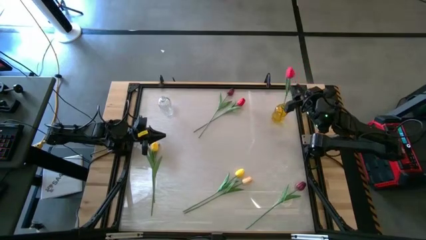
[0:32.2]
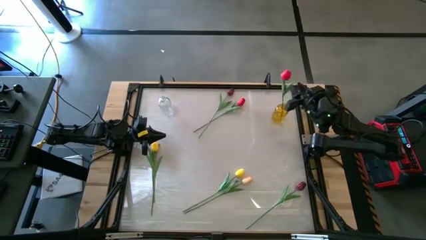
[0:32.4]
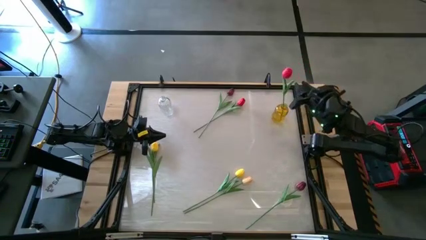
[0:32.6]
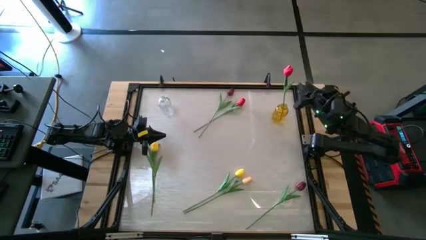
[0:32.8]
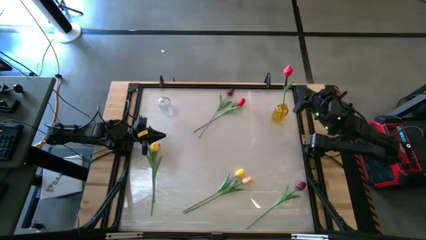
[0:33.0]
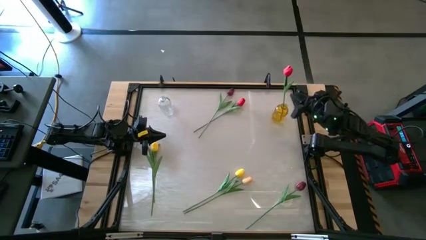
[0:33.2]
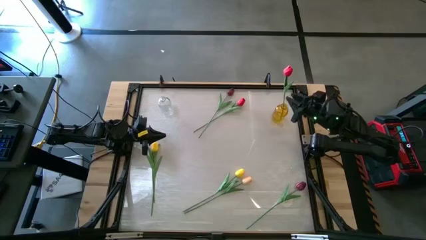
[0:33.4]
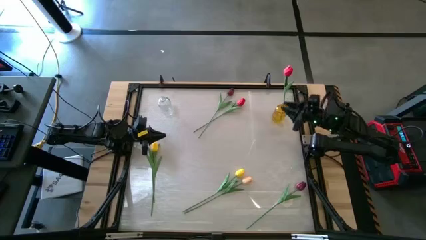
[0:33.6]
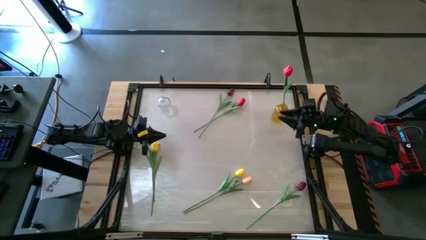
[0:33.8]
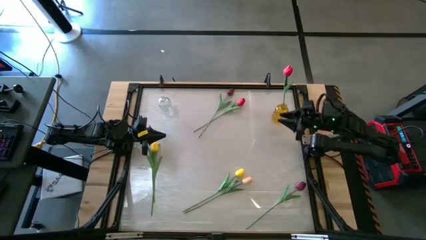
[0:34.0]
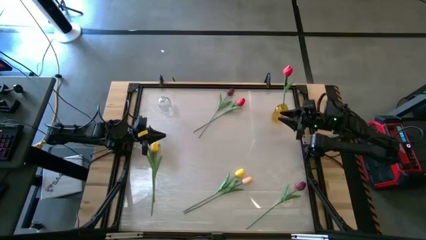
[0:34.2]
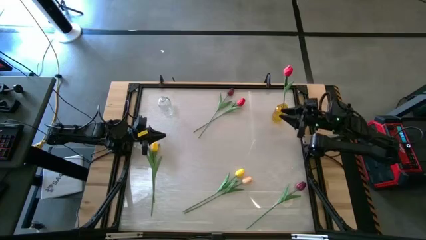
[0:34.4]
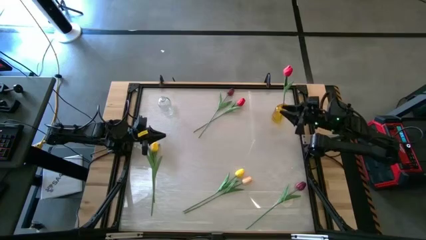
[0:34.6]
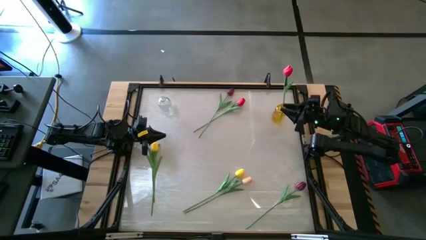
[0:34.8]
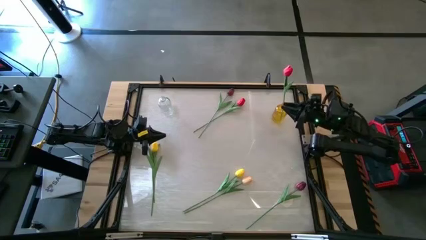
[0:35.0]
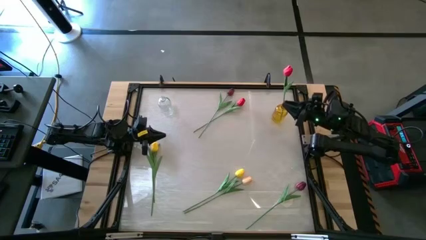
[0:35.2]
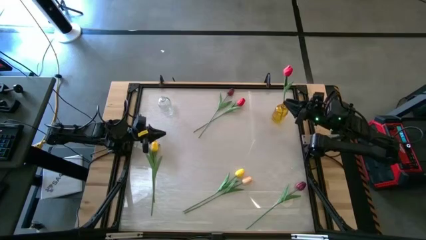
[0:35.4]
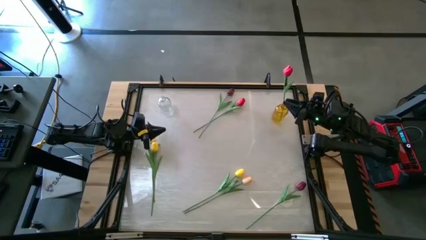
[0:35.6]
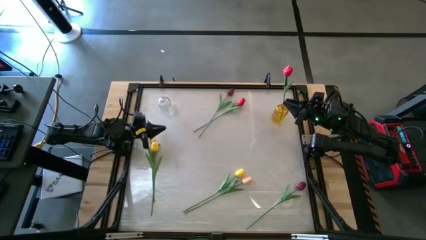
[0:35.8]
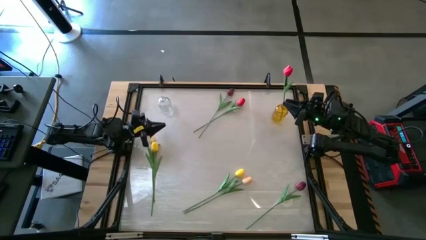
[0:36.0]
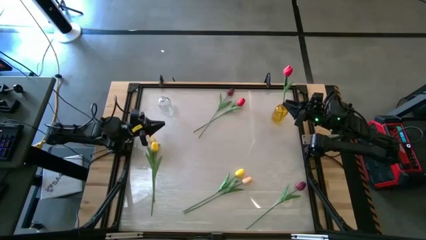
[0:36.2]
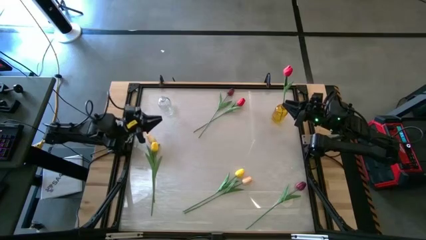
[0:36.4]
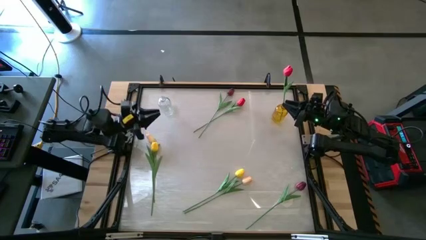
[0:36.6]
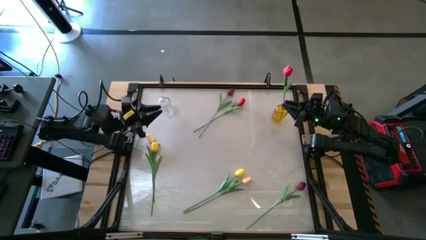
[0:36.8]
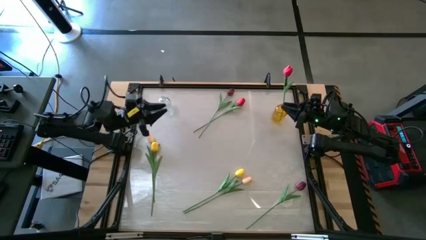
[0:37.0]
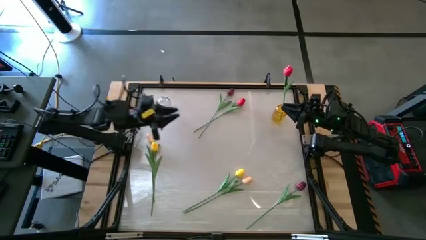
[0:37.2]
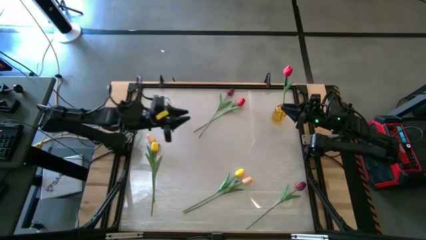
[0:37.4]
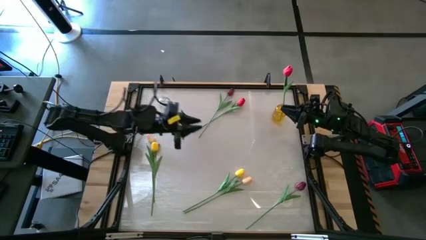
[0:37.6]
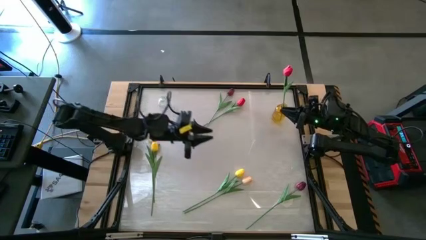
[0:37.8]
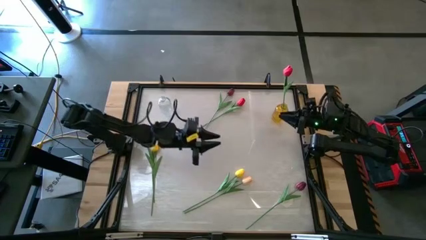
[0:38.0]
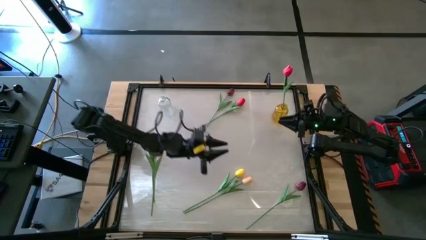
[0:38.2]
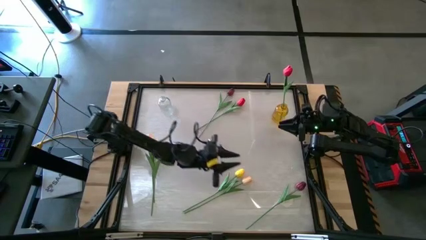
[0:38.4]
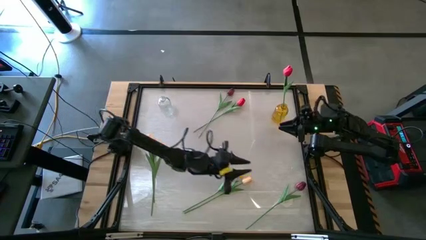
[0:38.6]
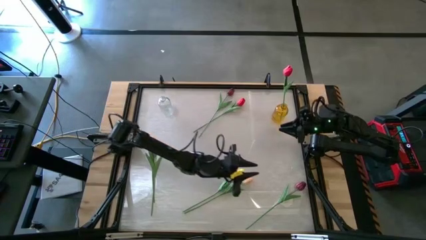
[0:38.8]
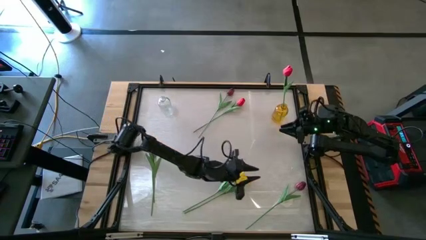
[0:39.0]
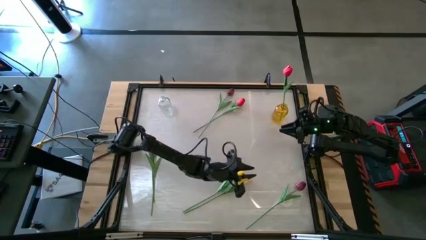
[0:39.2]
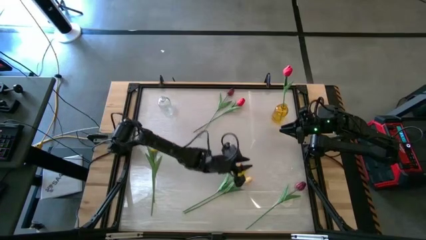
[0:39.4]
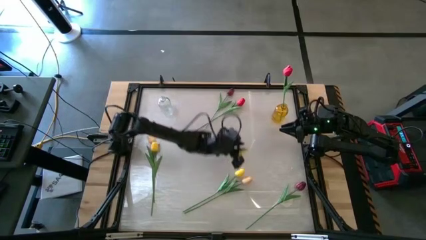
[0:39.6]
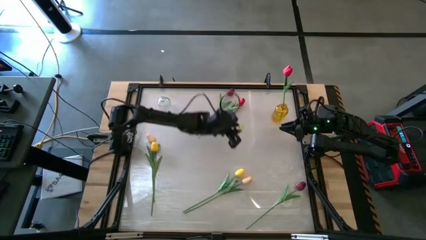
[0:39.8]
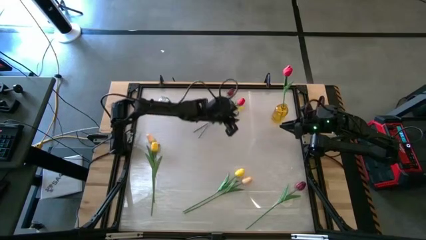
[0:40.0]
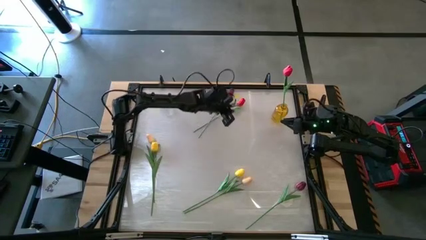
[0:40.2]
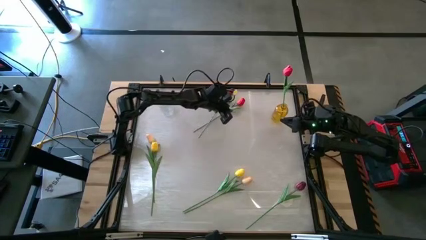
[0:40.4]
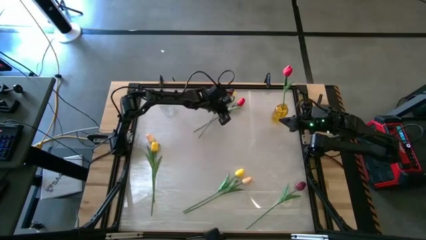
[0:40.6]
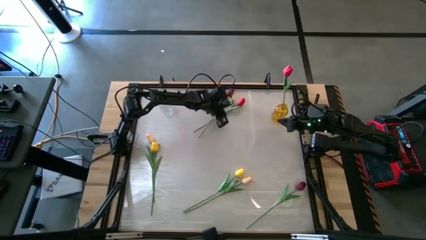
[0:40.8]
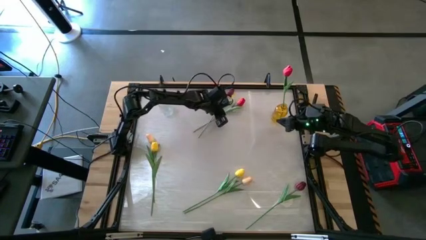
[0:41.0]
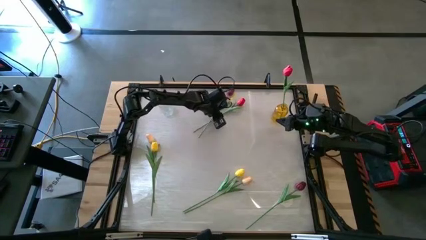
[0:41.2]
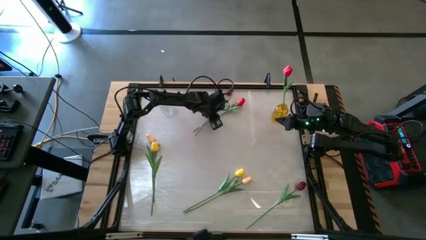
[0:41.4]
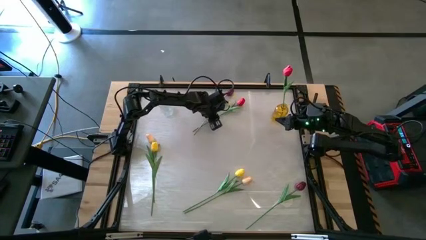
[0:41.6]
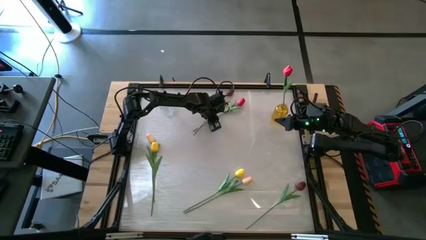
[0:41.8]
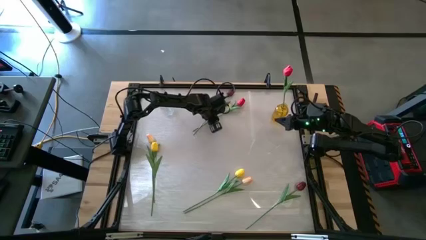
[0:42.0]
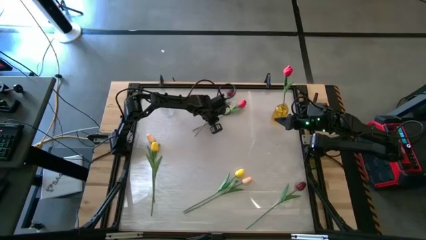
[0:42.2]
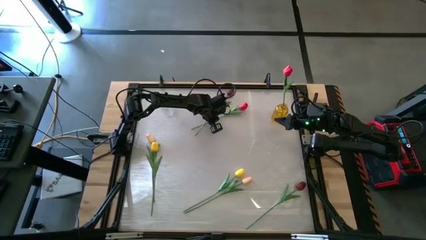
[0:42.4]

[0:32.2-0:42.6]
Task: Sort flowers into vase by color
Put the red tulip into the yellow vase

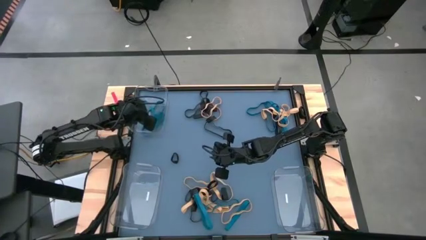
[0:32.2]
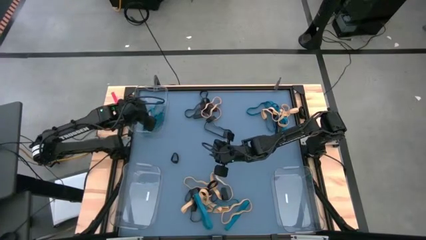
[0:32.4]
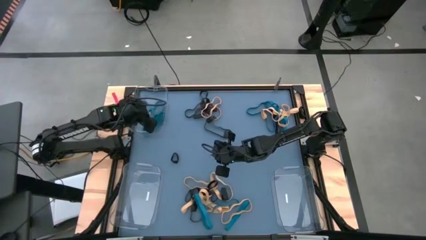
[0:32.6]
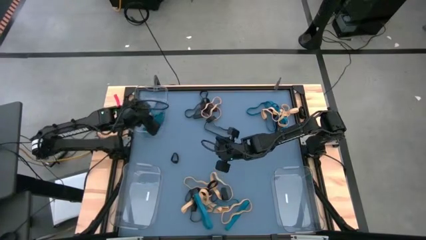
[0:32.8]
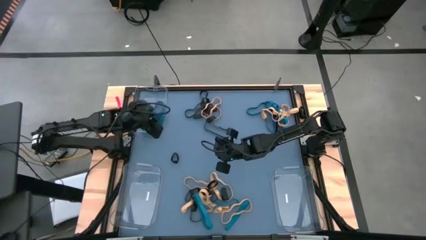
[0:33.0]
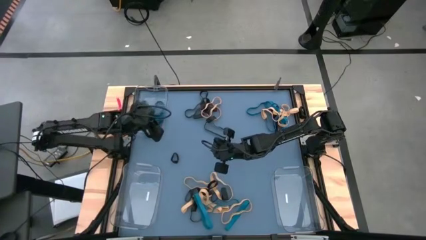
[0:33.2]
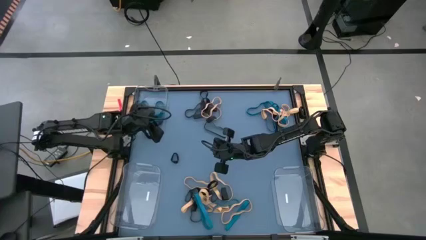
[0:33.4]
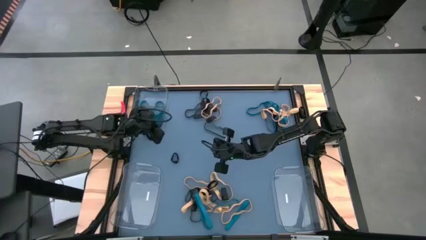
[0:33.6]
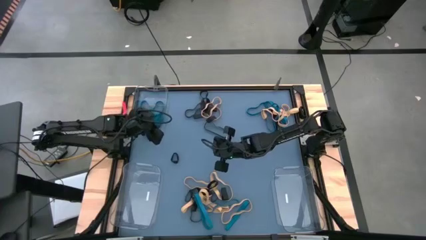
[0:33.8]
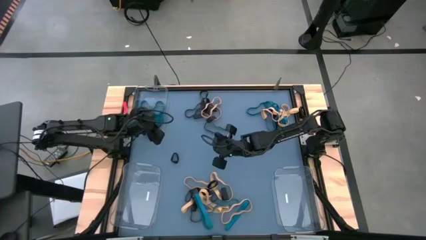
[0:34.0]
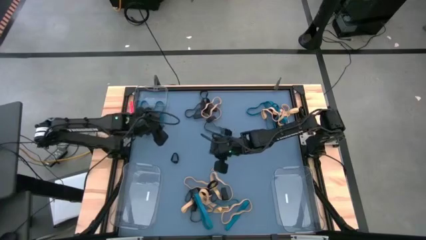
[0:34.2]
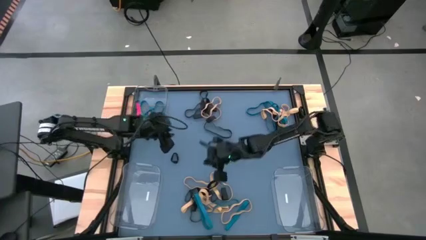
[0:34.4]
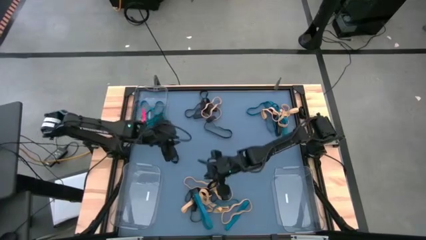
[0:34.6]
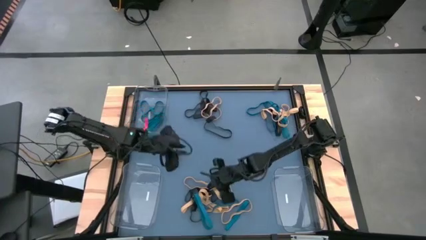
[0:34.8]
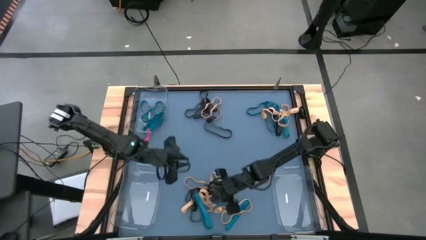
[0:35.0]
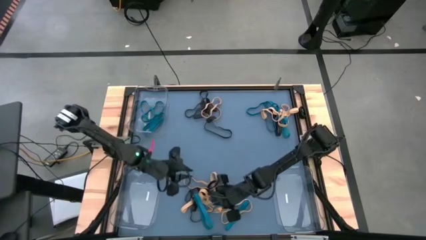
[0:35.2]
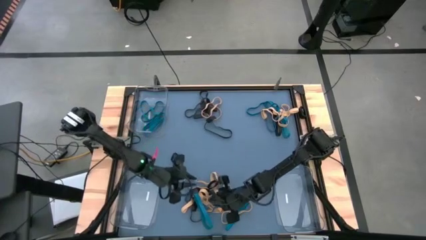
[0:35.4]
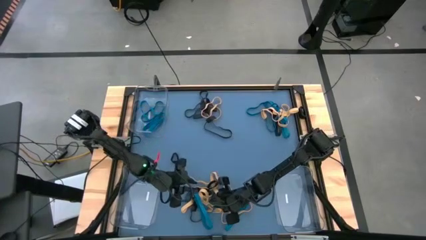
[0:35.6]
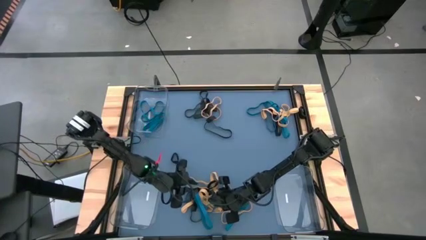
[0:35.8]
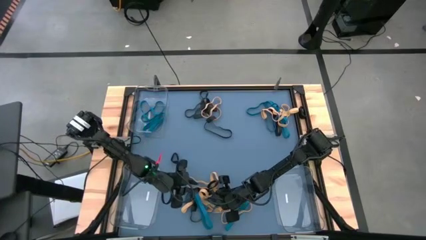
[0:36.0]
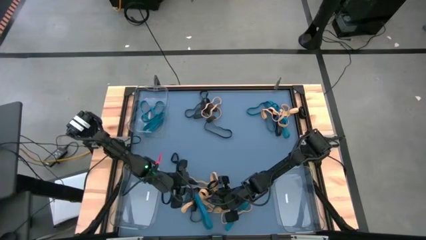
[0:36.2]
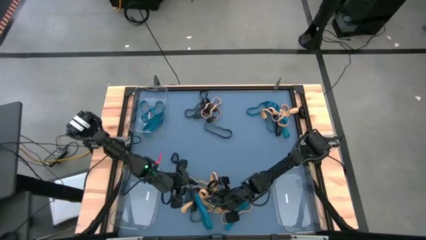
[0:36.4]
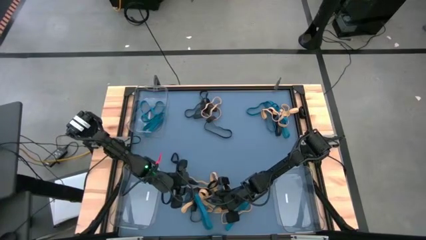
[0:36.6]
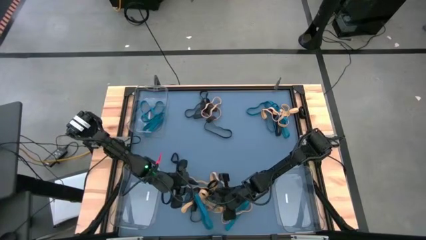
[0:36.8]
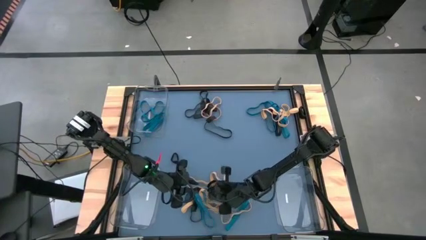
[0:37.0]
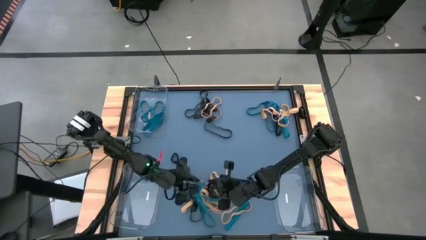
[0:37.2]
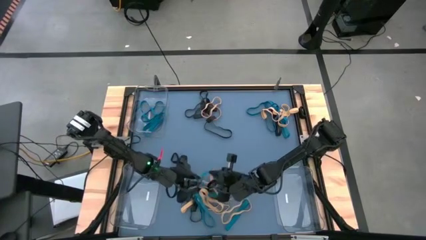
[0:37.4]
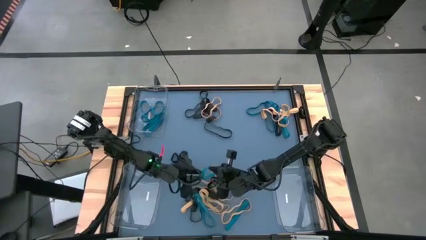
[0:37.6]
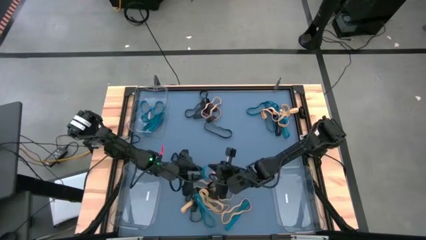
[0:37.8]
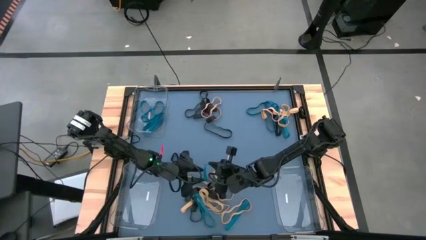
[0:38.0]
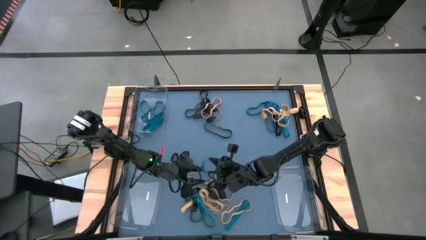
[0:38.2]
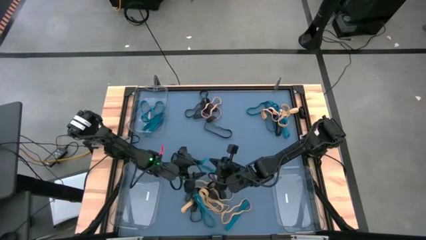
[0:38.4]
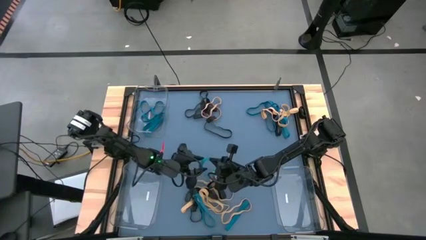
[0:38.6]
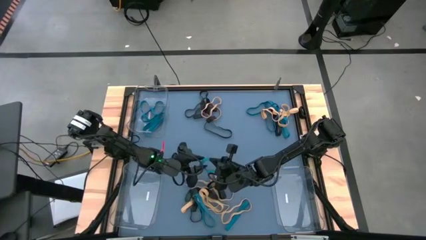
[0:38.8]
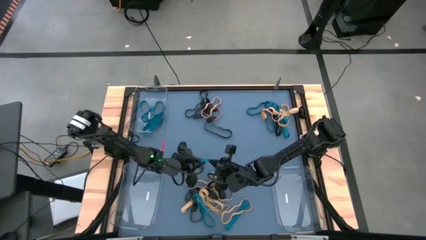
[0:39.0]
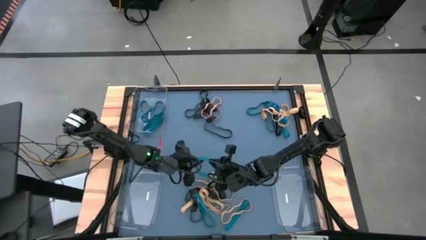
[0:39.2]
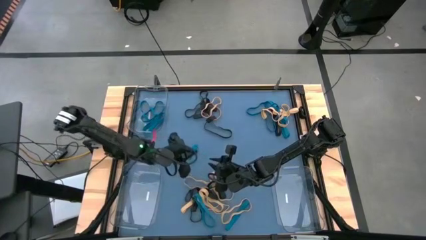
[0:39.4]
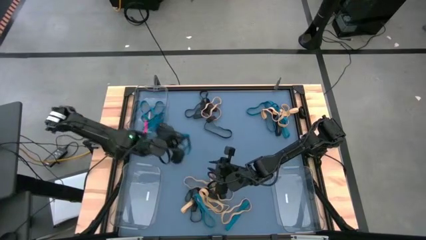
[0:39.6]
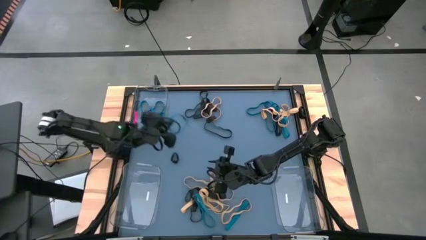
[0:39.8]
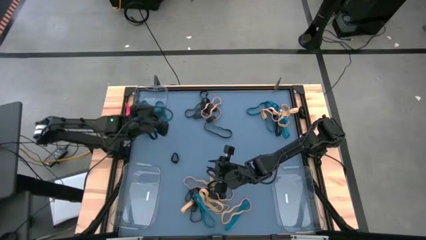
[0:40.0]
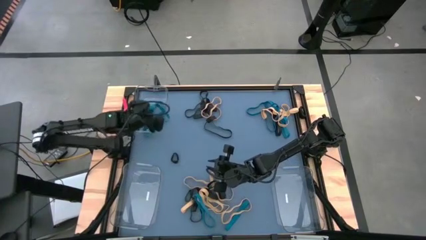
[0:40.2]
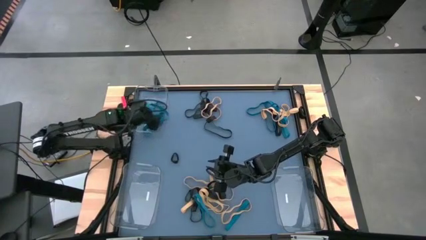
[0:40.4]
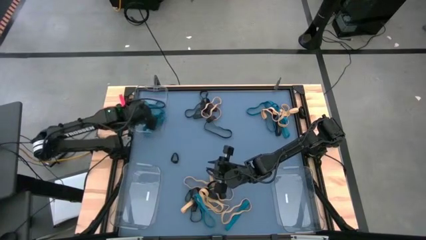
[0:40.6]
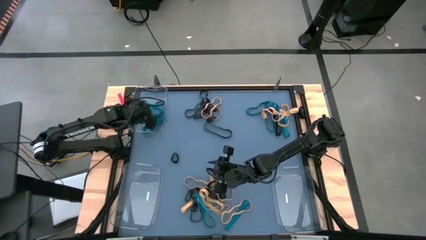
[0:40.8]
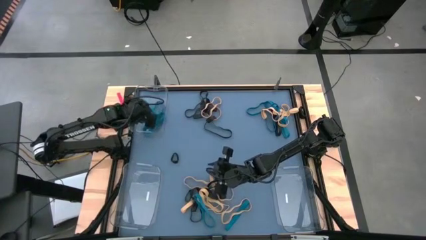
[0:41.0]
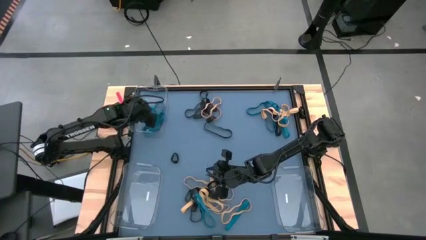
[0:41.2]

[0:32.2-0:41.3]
Task: Sort rubber bands into baskets
Put the blue rubber band into the top transparent bin
